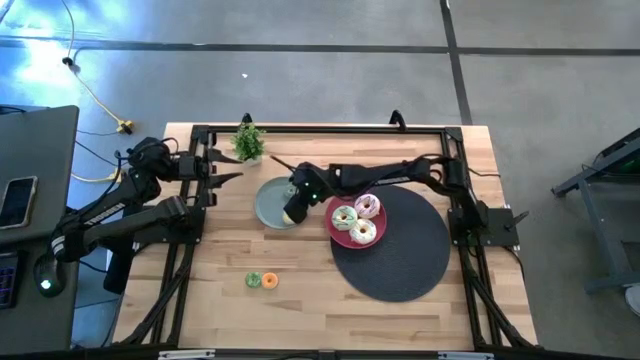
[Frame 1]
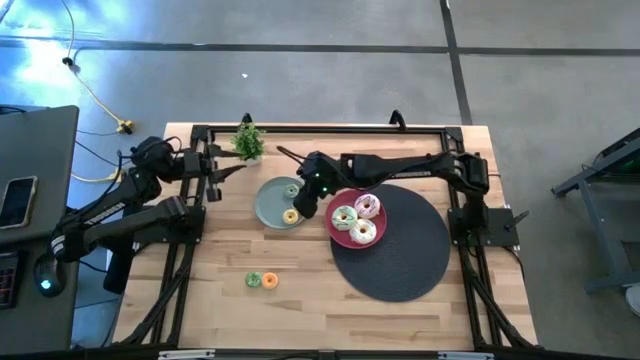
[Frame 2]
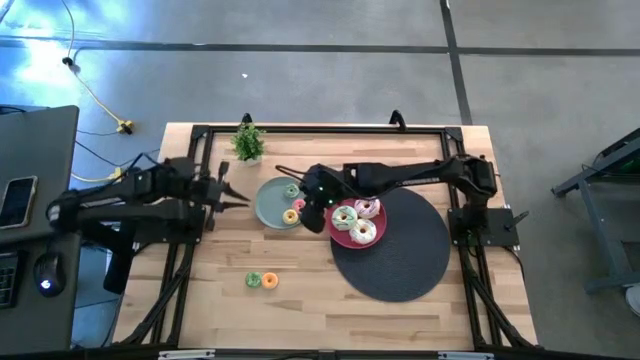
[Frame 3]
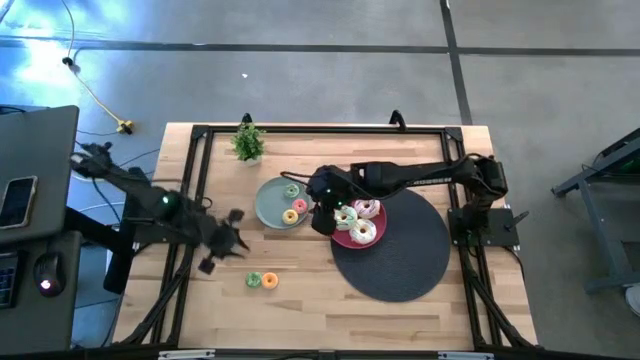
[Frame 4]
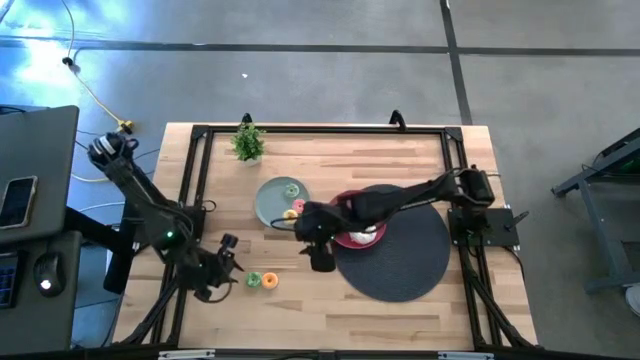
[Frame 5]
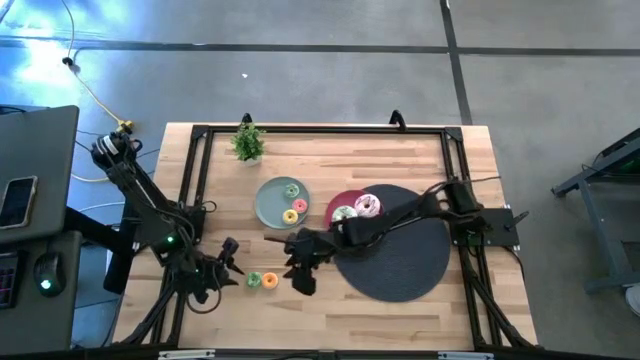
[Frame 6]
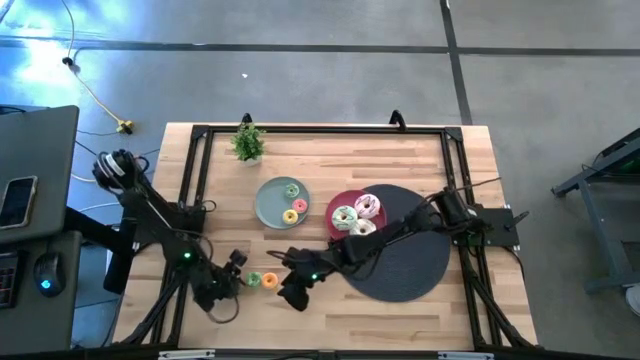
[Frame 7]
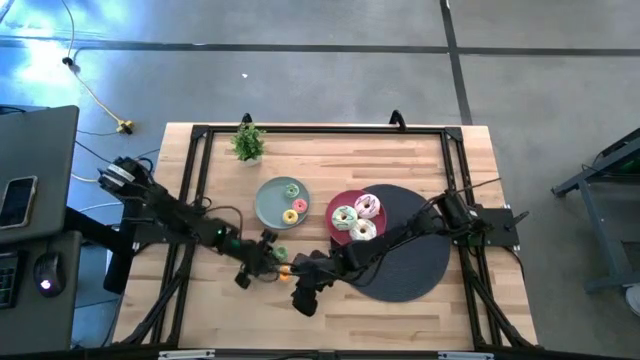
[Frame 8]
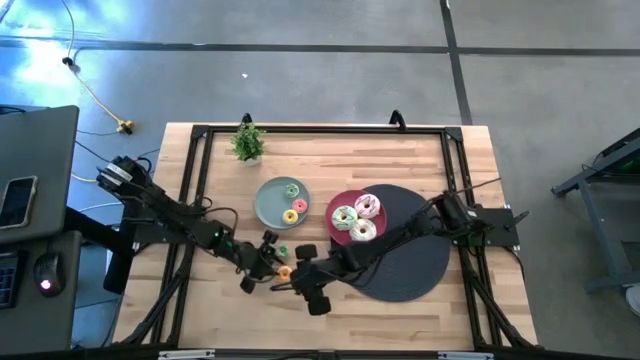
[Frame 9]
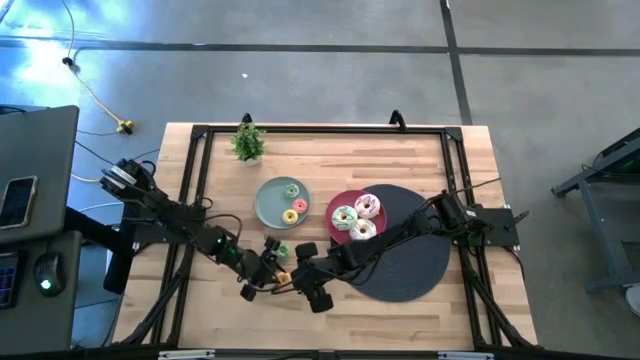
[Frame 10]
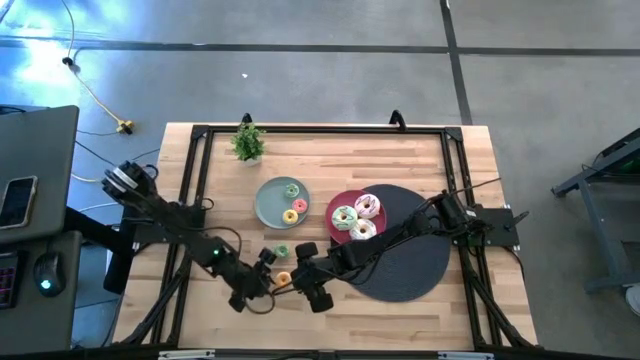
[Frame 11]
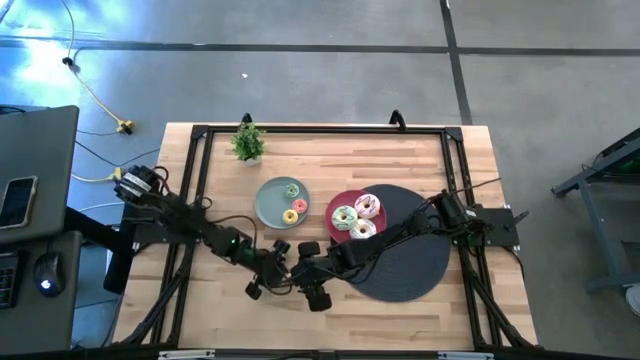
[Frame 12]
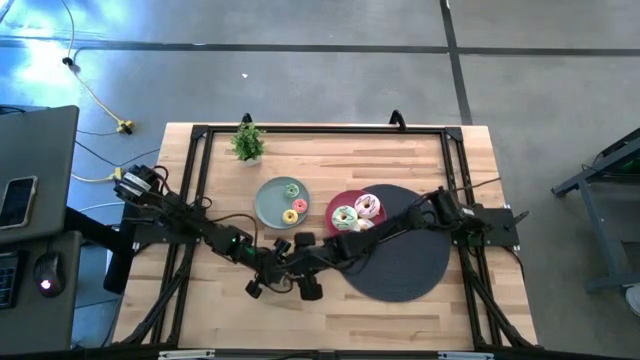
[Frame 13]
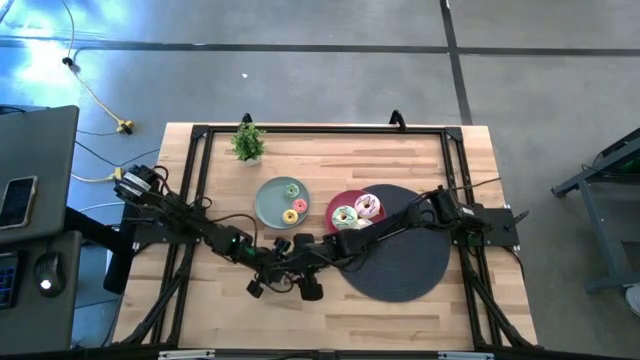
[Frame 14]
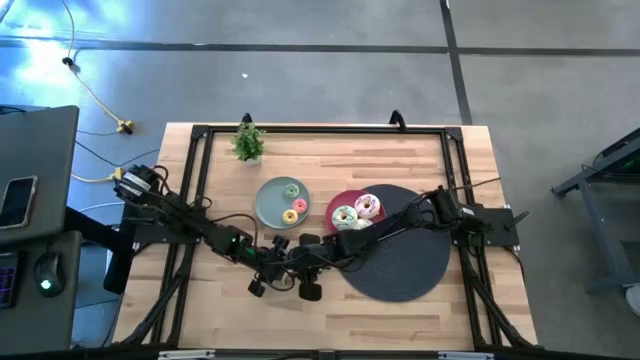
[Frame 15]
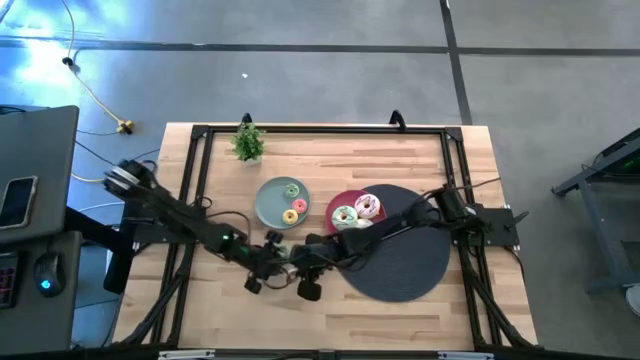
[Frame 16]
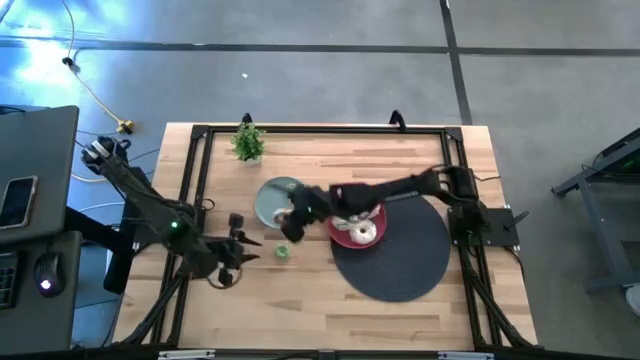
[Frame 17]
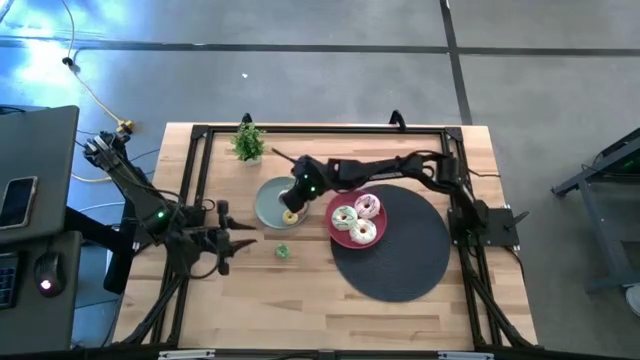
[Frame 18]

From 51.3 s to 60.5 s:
Task: Pick & Place donuts
Put the small brown donut on the blue plate

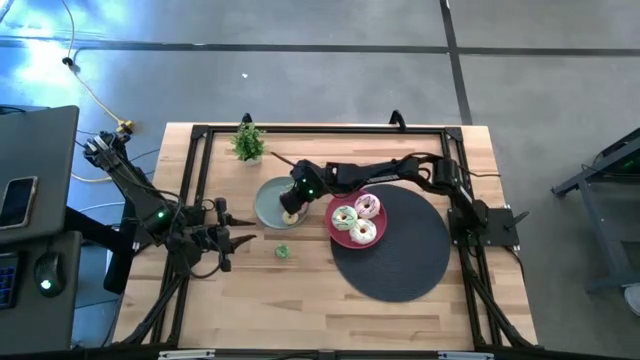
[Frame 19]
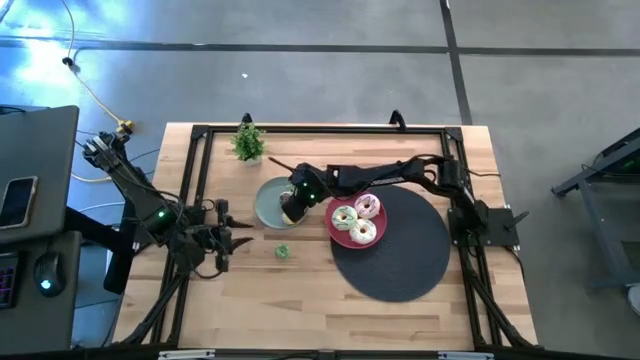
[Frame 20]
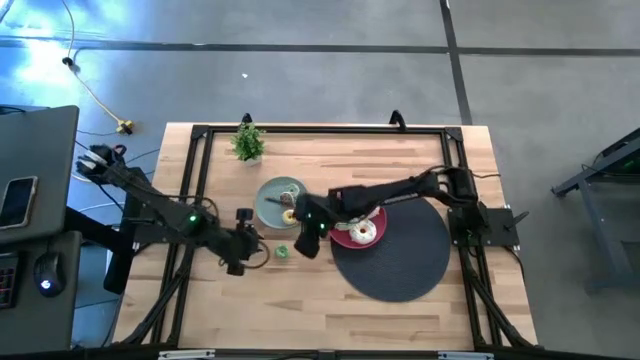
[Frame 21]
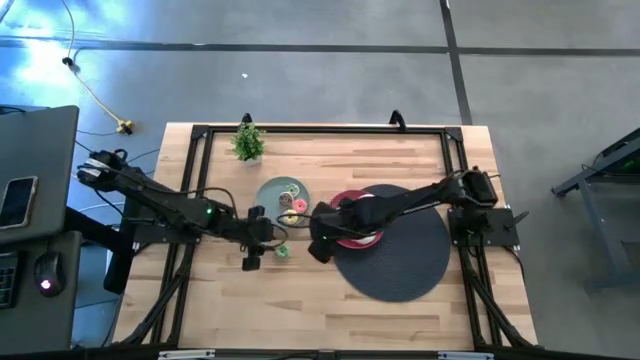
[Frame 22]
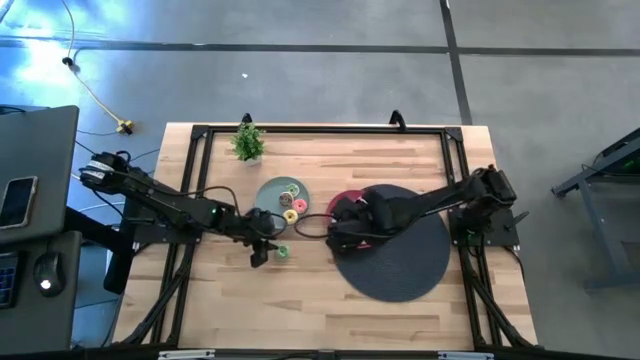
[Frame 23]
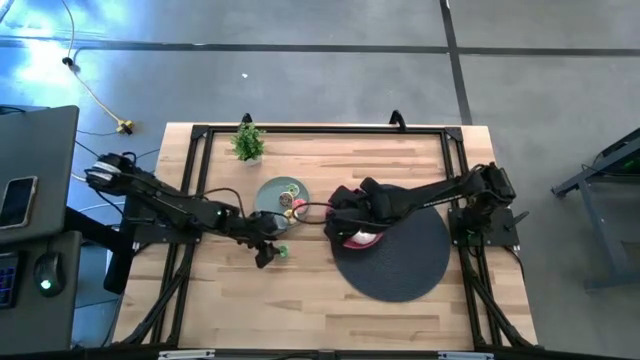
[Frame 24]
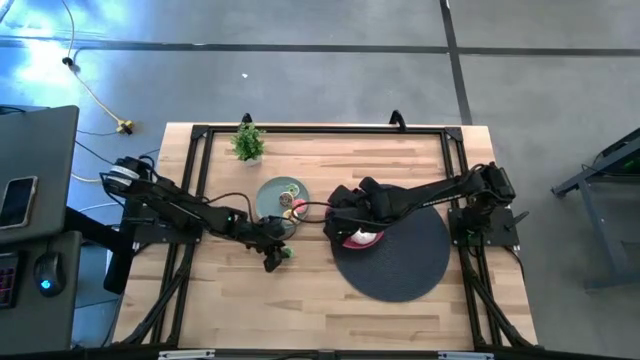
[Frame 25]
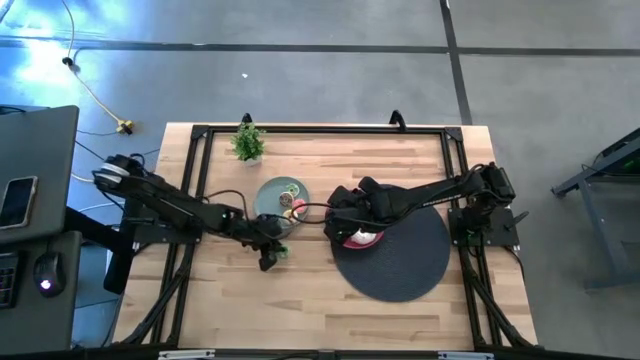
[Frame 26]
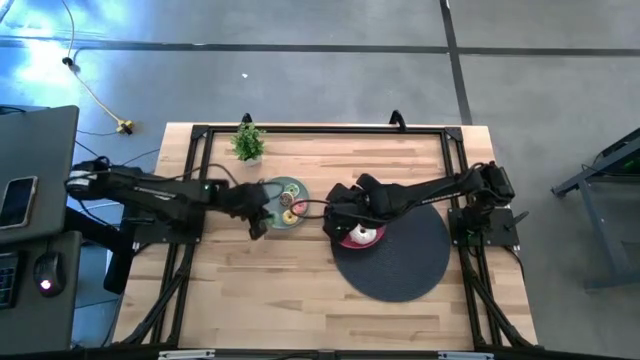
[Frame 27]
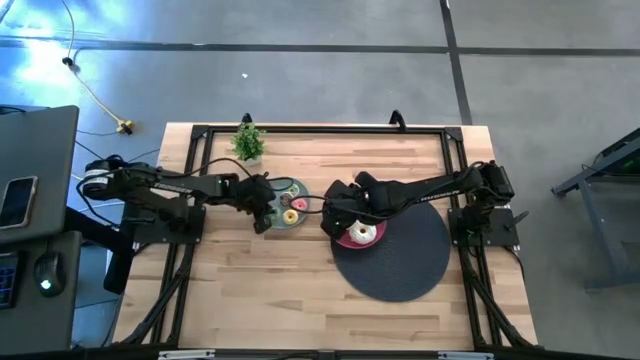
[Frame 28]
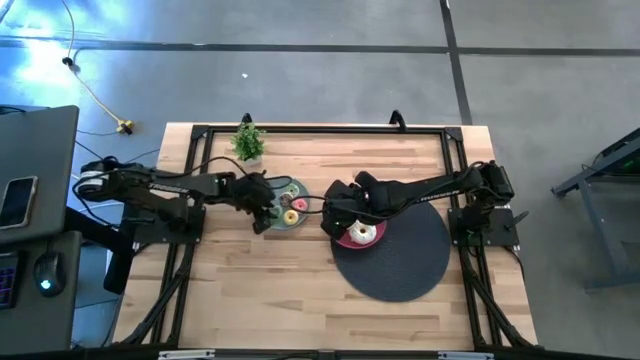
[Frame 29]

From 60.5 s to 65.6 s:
Put the small green donut on the blue plate

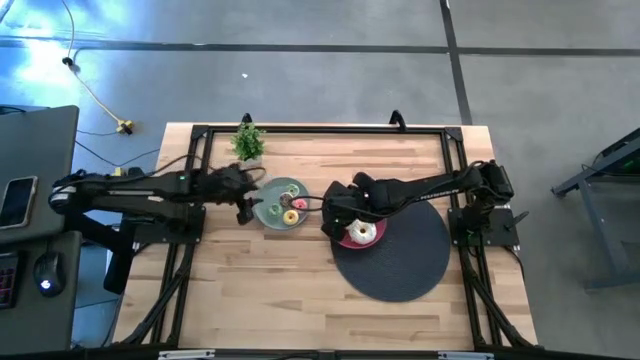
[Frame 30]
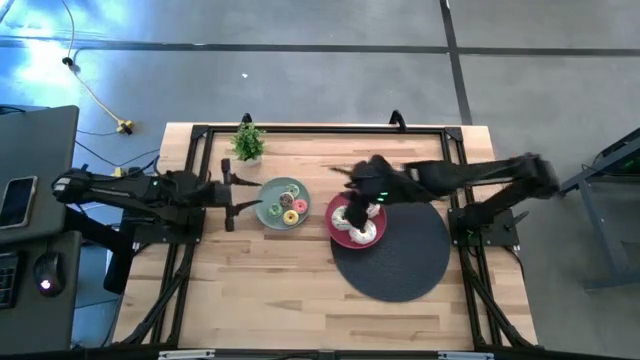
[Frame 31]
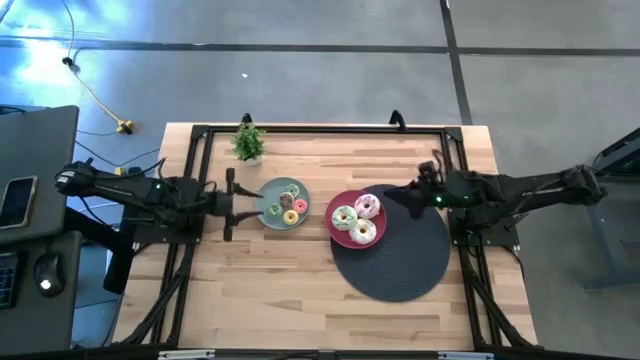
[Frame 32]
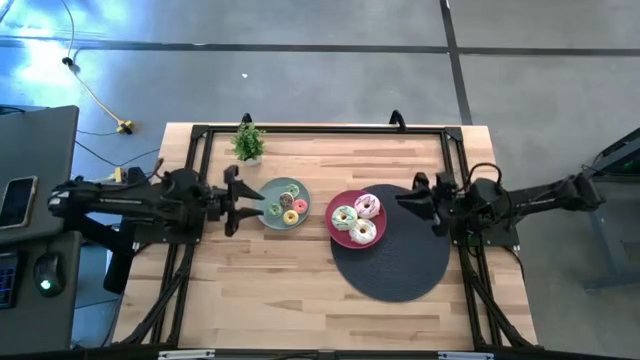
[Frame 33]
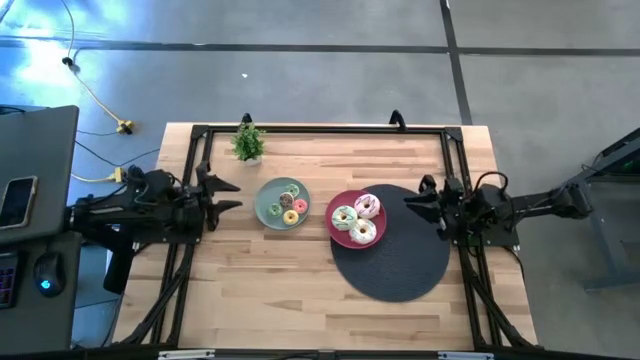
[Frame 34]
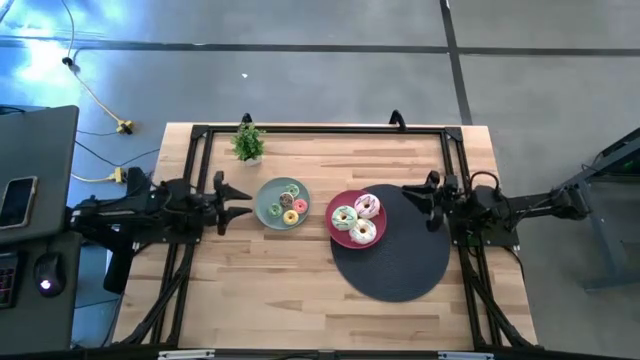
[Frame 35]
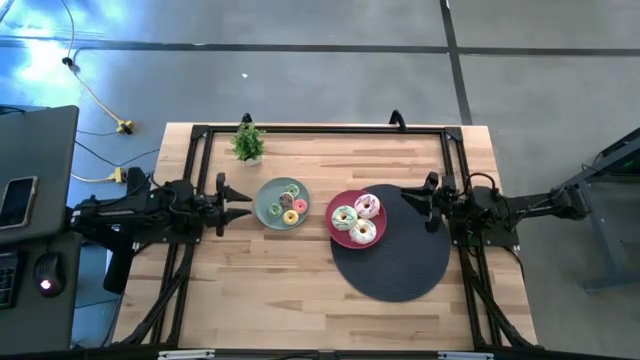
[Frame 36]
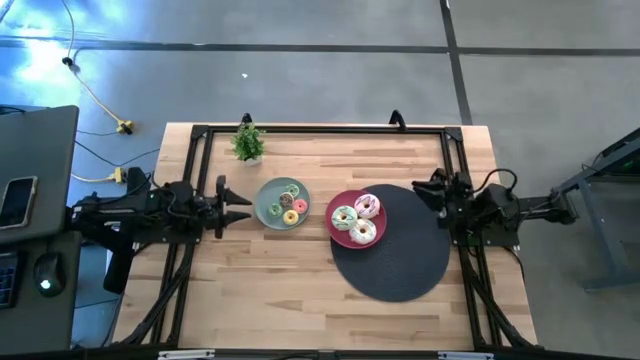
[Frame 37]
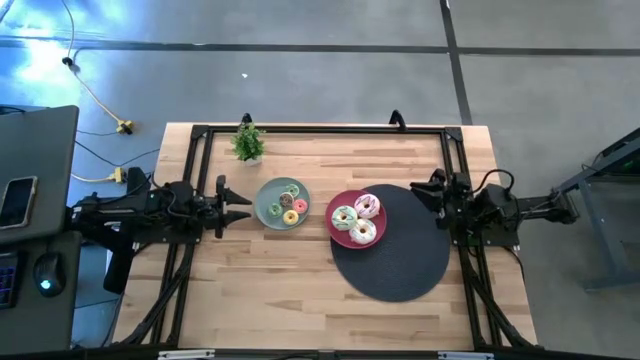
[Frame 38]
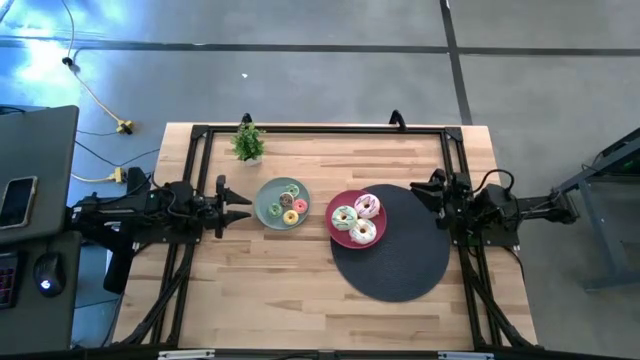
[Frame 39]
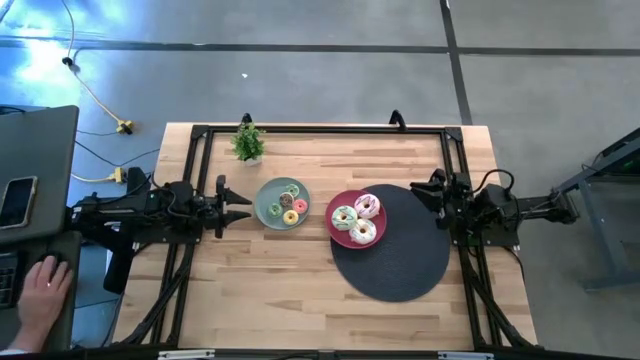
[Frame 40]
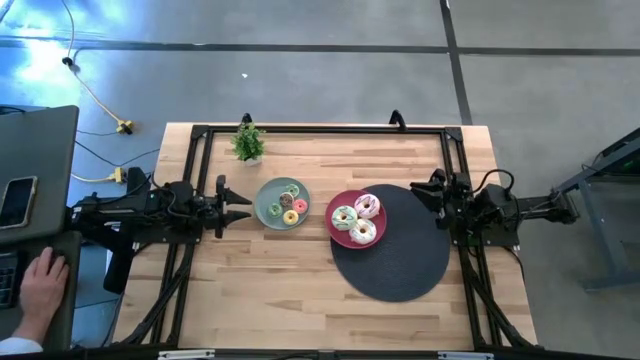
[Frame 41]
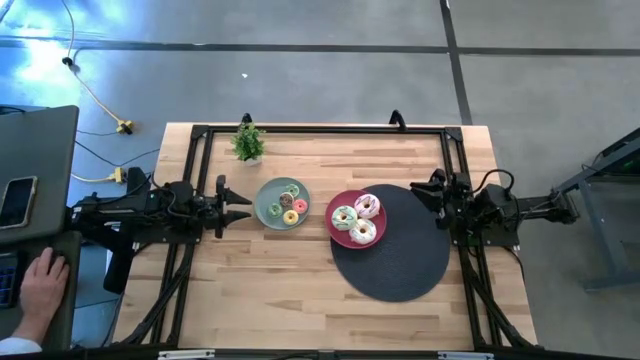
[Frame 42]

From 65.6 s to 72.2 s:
Return to Home Position

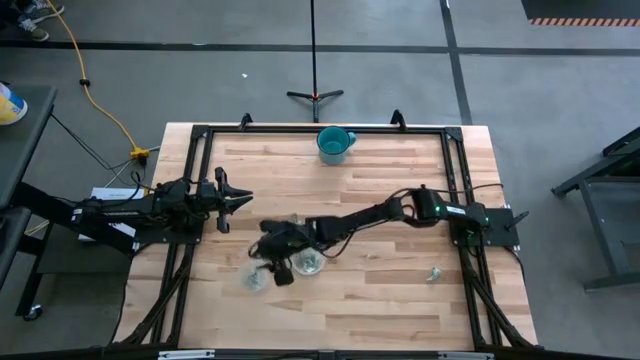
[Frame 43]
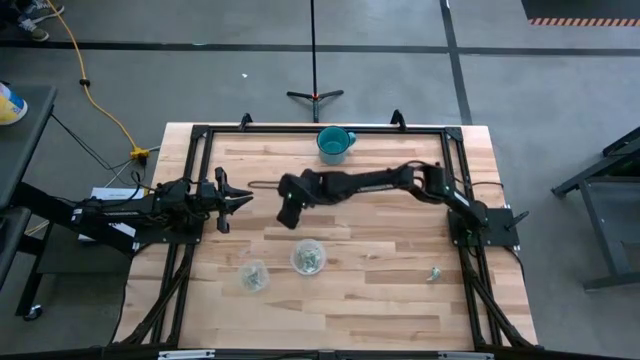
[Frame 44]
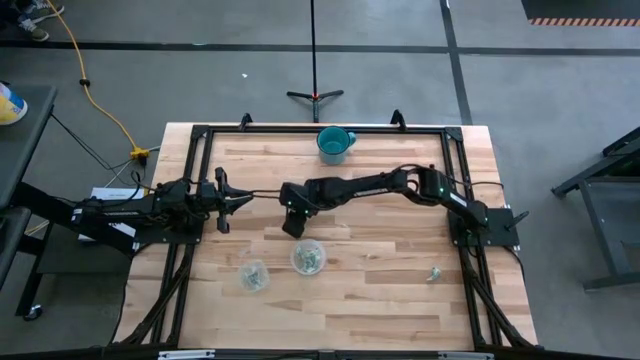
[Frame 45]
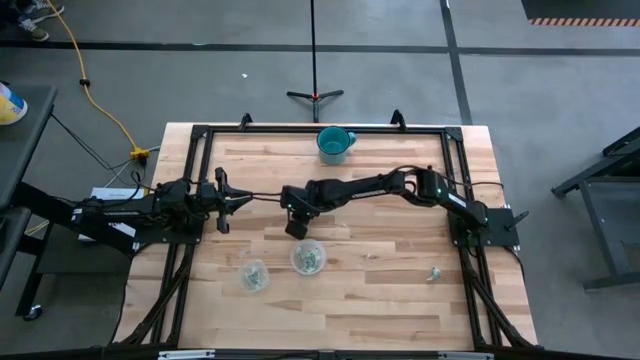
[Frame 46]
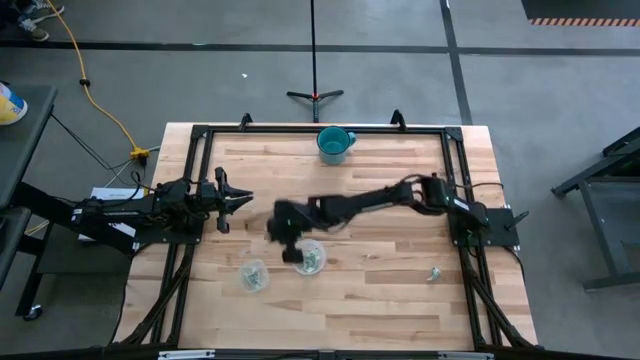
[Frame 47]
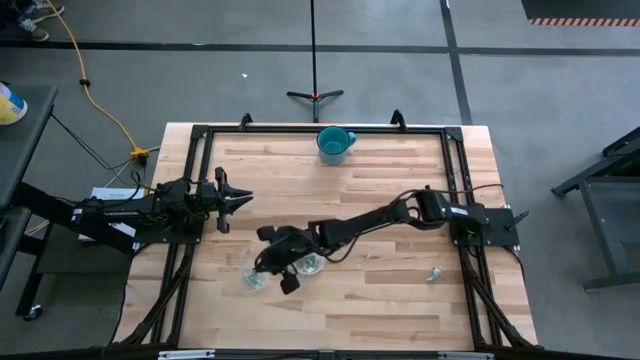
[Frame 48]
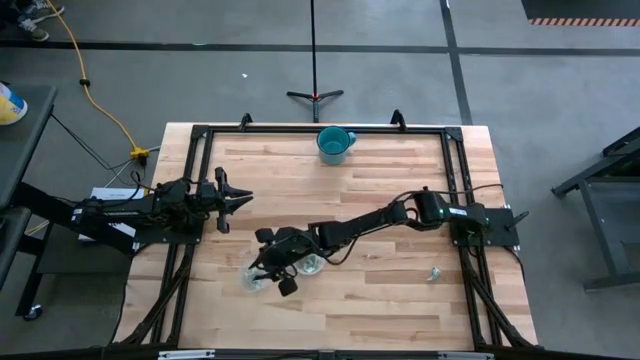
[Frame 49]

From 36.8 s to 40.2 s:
Task: Pick and place items into bin
Put the stevia packet into the left transparent bin
